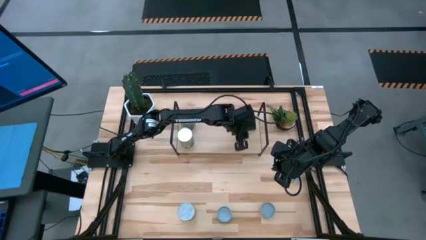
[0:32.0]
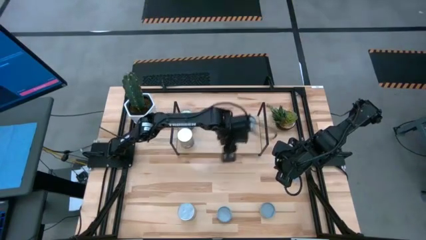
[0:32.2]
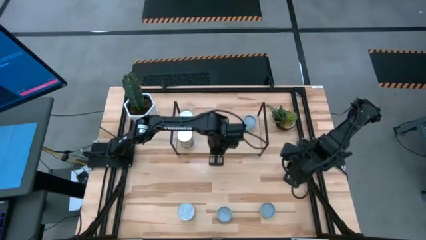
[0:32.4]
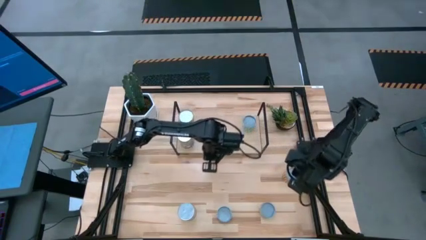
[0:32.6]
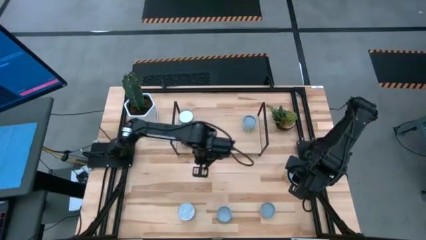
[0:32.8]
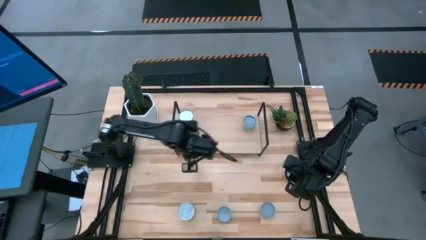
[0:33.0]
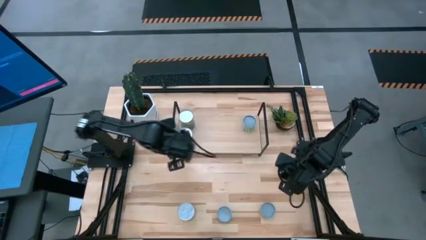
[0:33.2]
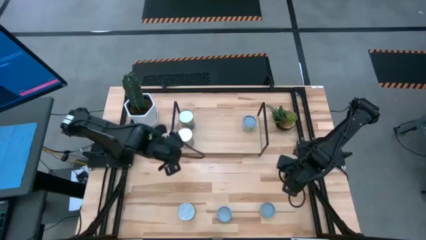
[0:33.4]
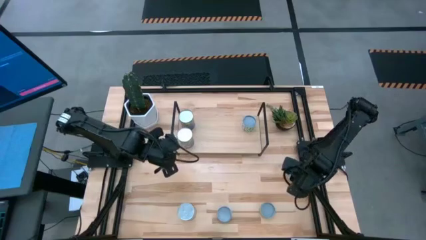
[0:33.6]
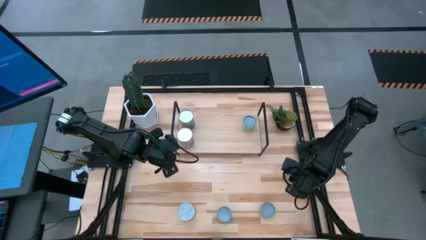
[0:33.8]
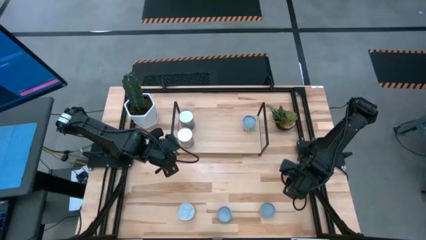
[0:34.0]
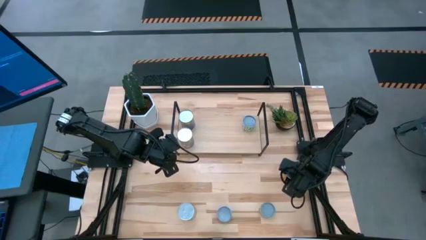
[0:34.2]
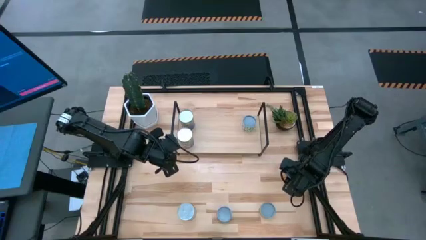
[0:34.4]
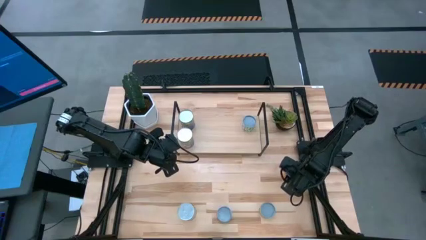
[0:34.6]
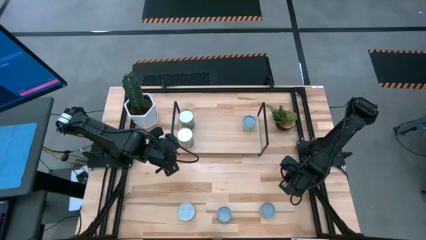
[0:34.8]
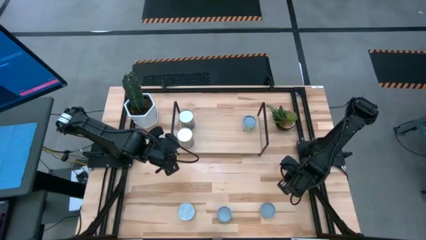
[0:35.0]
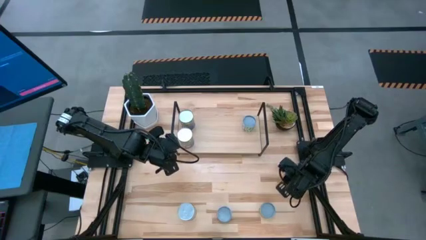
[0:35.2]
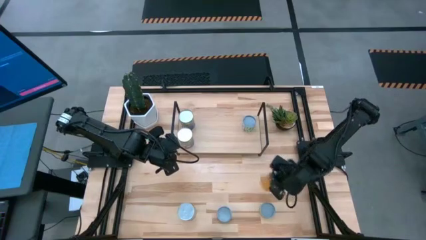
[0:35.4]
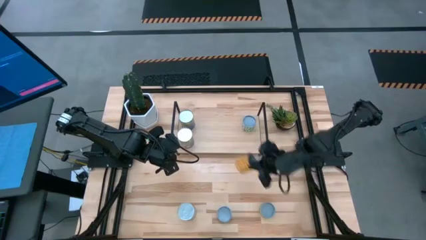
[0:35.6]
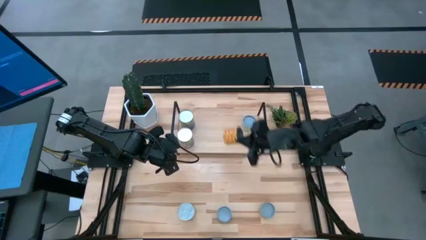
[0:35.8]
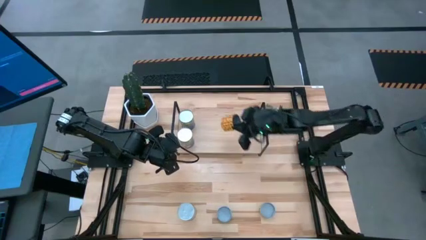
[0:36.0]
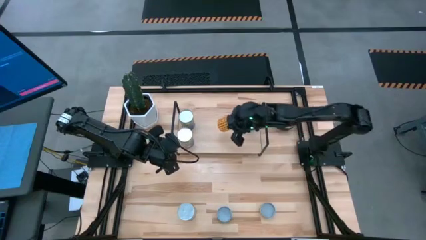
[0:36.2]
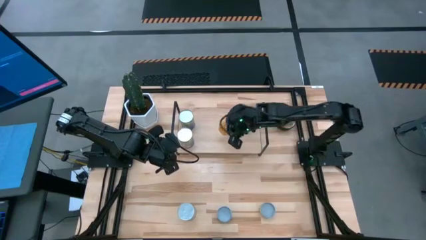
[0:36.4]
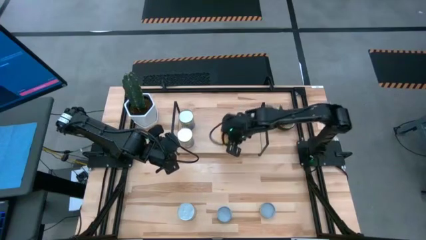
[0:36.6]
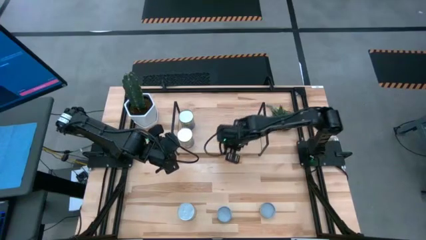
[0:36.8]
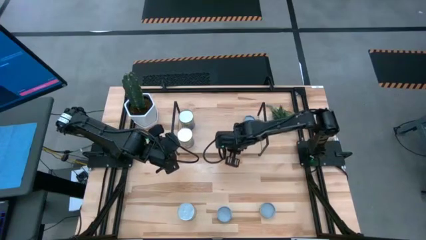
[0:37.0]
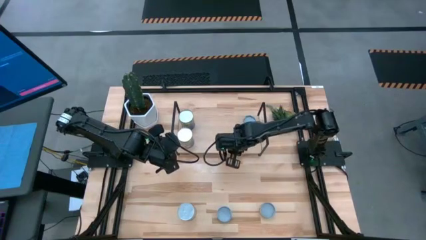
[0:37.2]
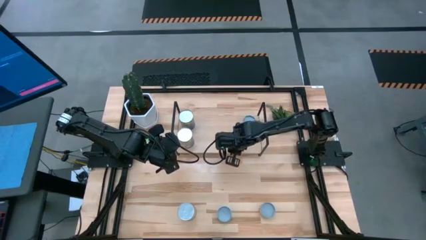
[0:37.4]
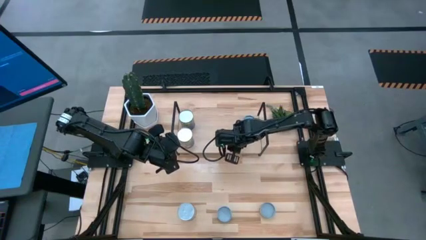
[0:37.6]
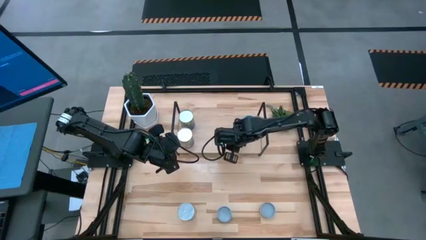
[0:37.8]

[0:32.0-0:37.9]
Task: Pick and place cans onto a shelf
Put the canned black beans on the shelf

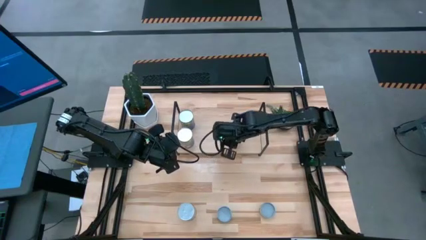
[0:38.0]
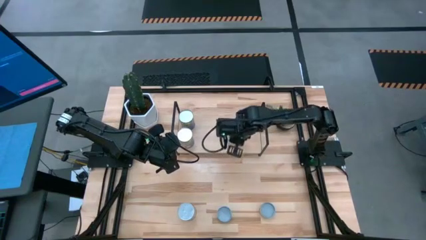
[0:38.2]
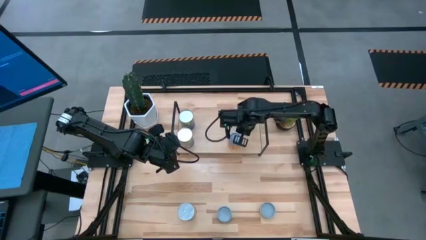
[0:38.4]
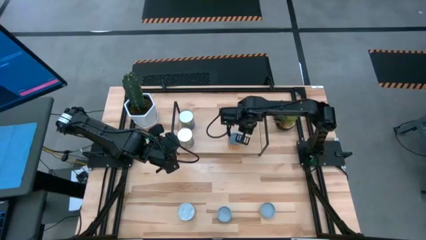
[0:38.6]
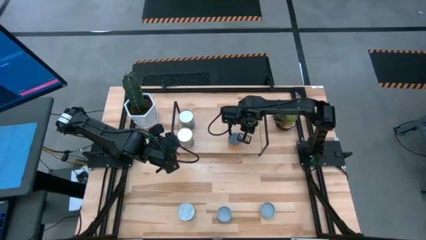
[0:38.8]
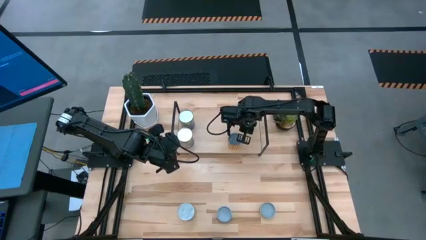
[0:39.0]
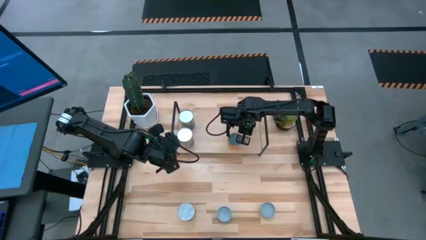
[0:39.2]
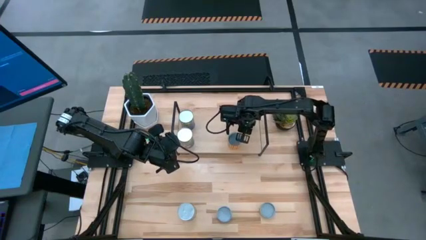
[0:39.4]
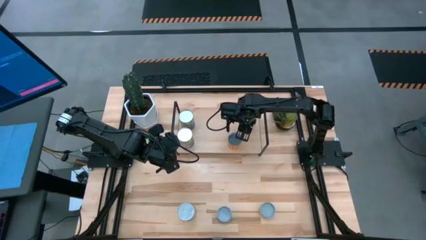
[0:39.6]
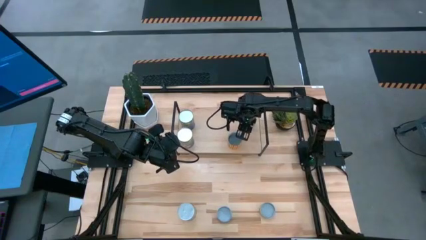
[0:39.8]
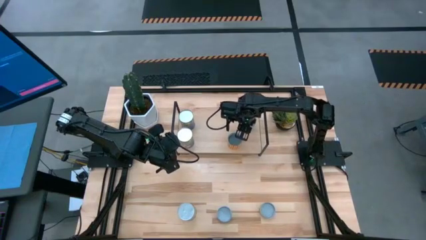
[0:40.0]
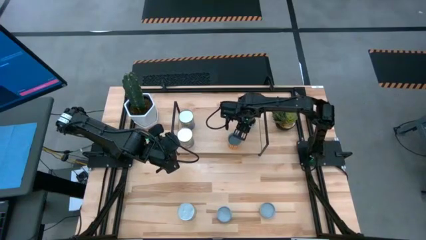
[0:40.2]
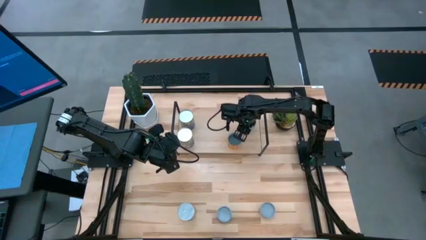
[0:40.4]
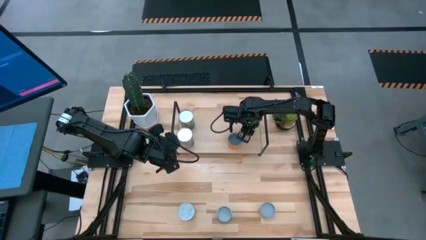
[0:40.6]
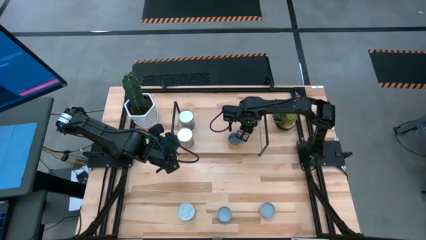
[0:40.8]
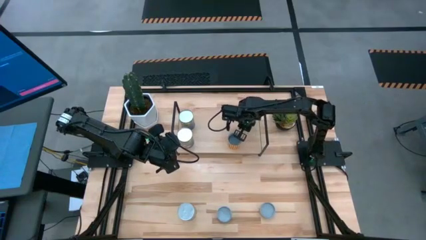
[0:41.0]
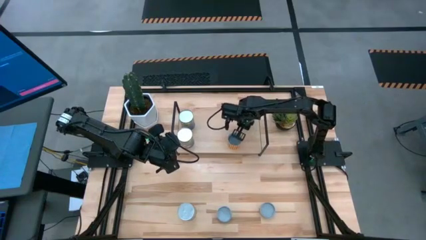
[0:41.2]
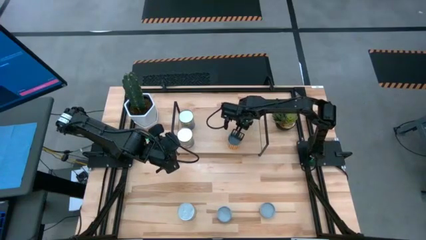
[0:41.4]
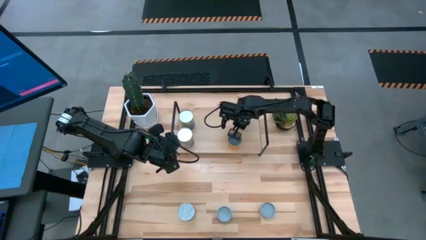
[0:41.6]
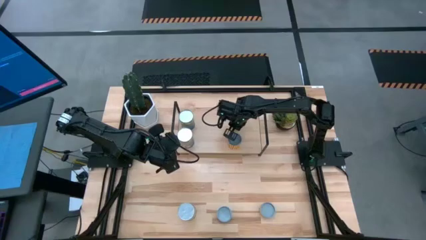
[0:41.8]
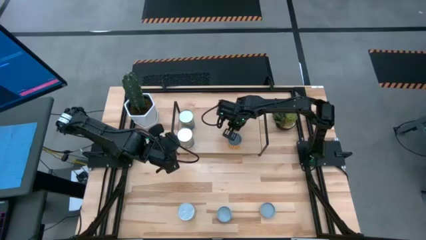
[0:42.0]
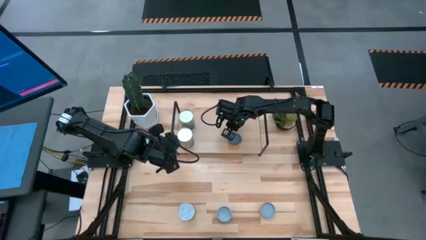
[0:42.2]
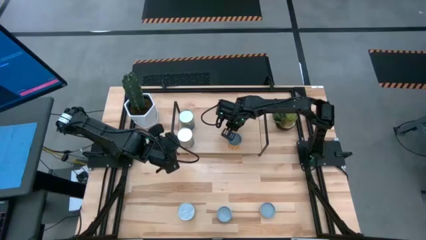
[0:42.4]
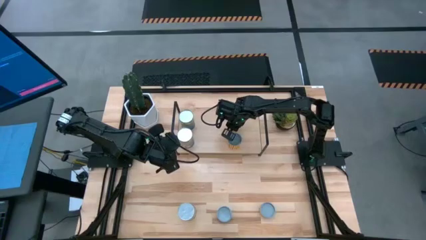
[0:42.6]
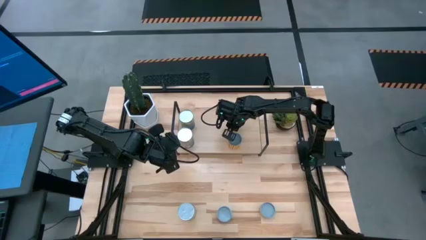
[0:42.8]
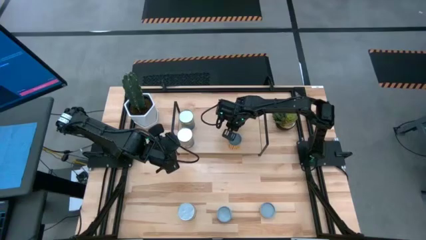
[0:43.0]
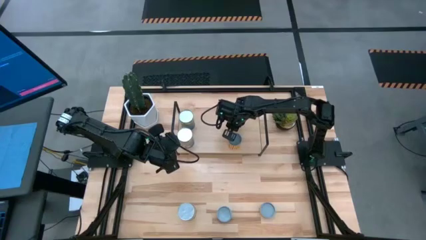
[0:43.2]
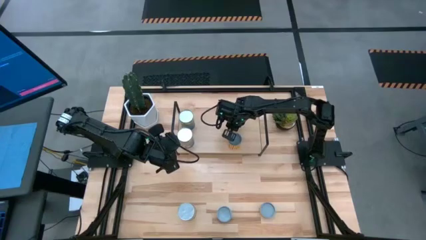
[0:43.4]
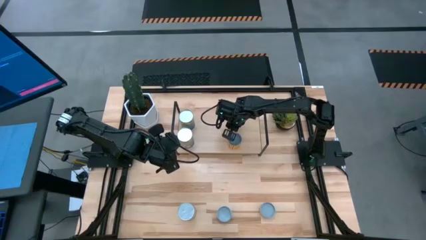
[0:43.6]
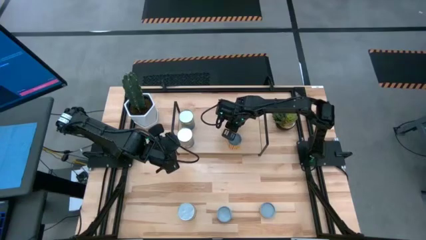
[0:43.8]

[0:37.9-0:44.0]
Adjust the canned green peas on the shelf

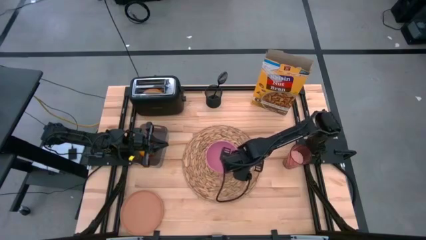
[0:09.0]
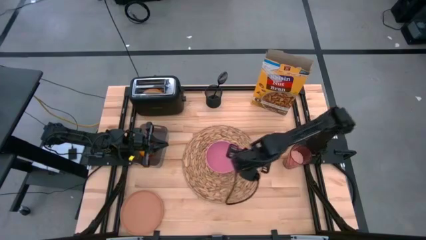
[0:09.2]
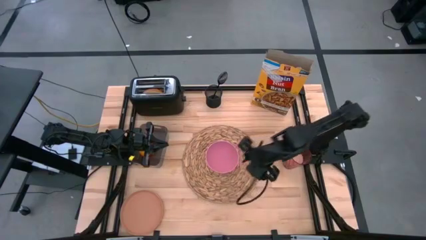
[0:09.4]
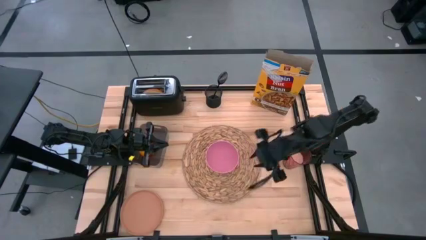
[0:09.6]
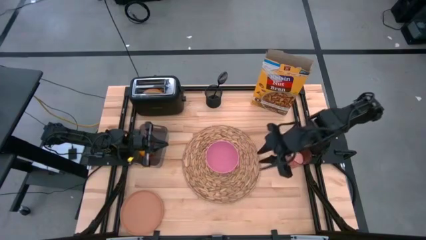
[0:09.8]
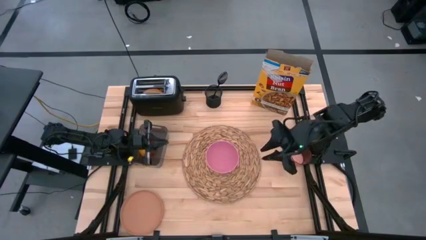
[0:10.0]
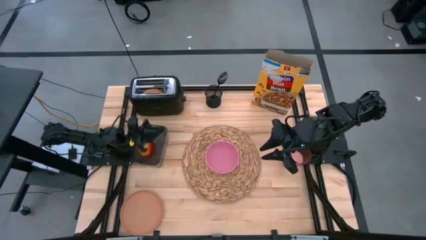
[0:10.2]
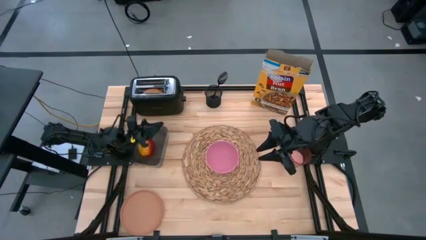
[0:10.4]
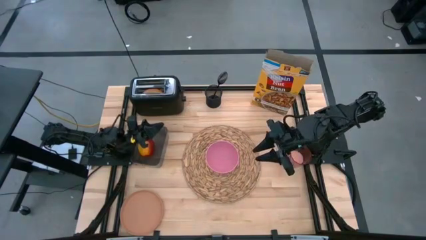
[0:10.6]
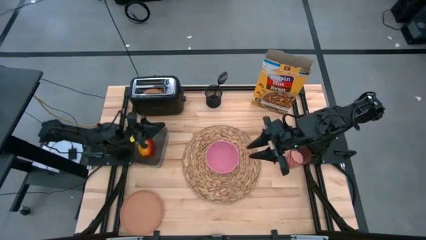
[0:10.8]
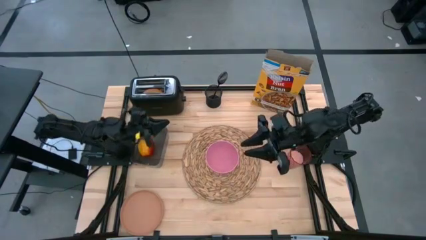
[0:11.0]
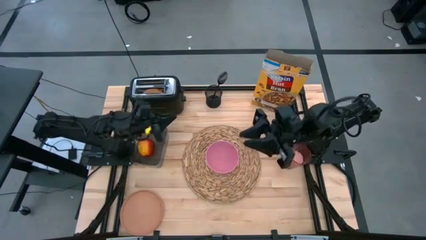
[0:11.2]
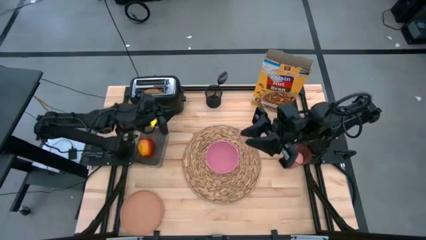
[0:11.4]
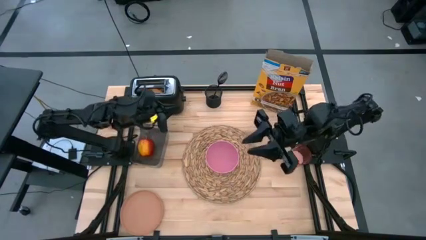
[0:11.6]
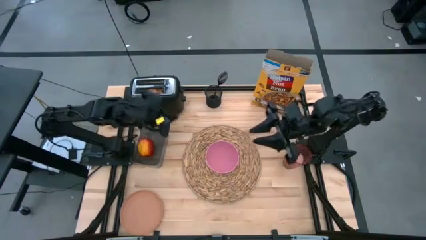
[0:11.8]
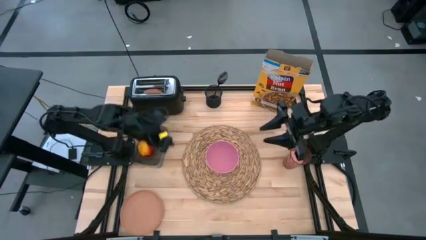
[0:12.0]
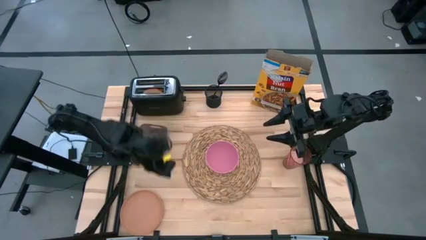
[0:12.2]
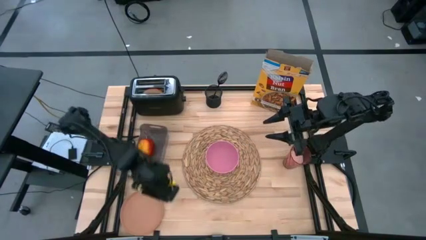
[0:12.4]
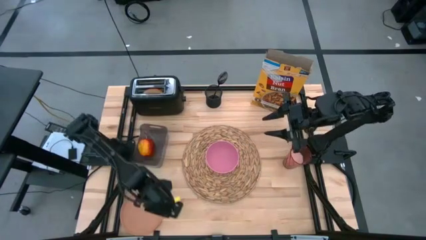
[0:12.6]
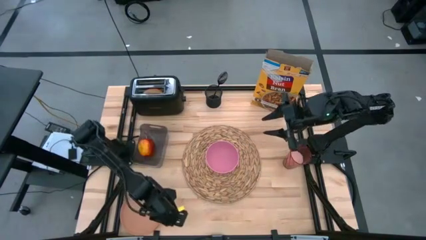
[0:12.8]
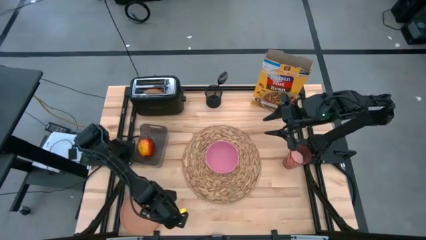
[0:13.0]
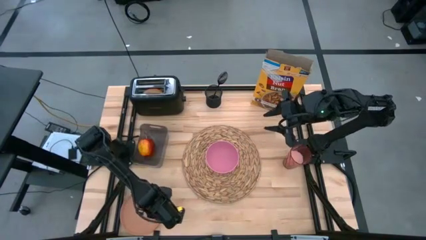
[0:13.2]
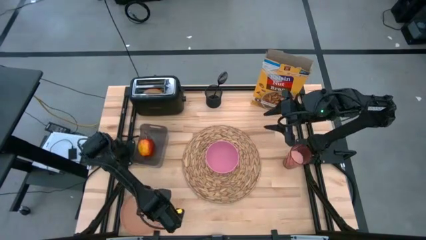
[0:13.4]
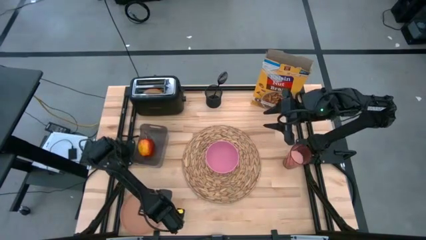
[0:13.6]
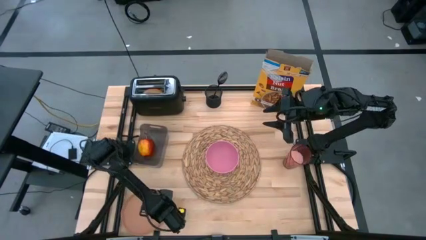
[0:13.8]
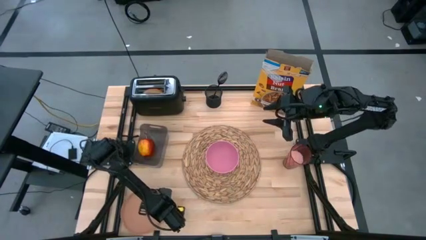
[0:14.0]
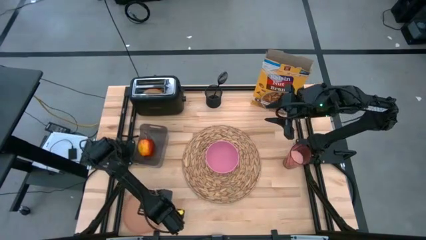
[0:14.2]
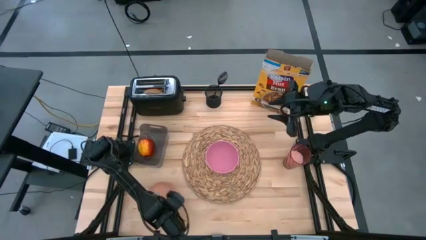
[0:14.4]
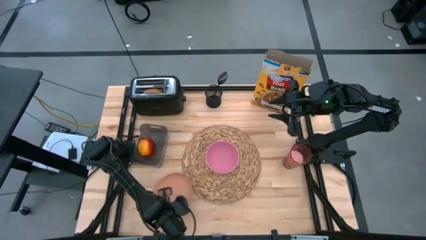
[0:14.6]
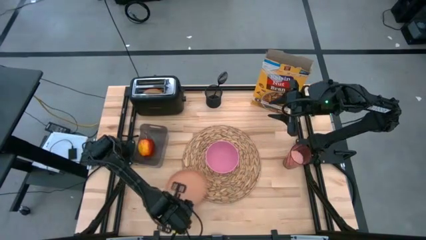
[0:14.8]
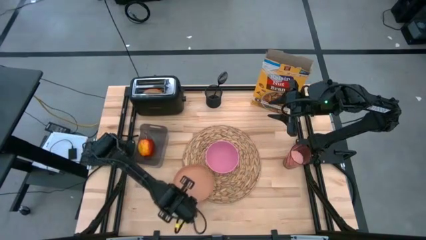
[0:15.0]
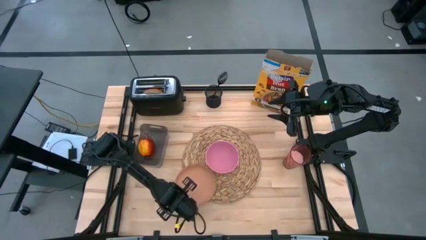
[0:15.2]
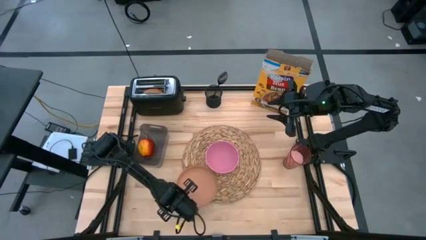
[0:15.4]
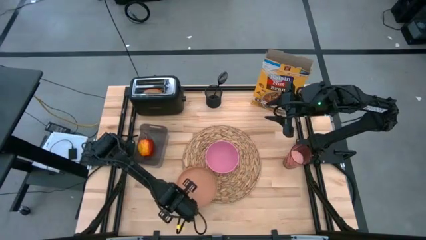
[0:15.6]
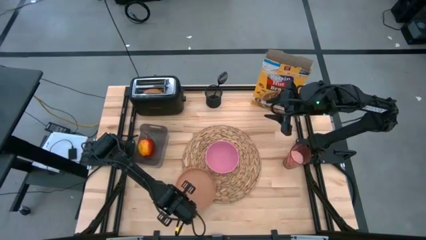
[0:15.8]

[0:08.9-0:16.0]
Task: Arrange a breakfast setting
Put the orange plate at the bottom left of the pink bowl
